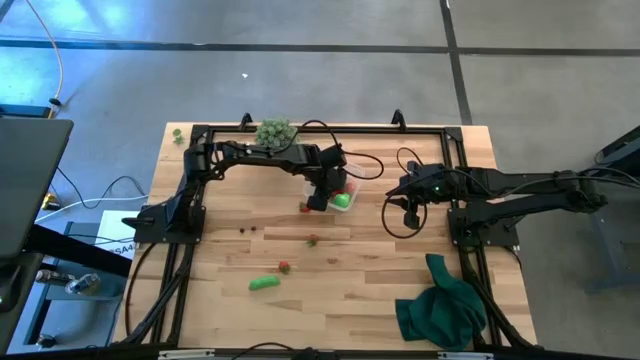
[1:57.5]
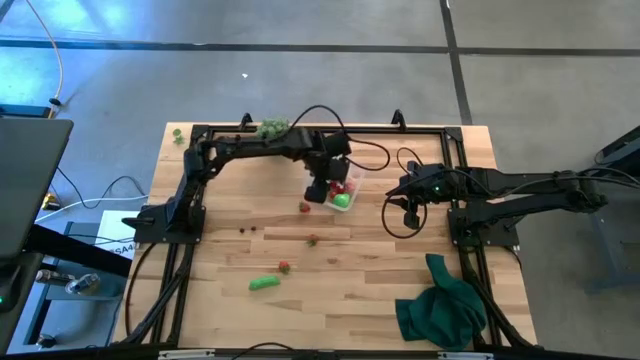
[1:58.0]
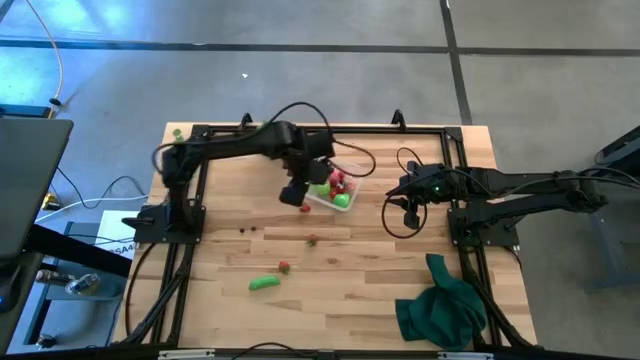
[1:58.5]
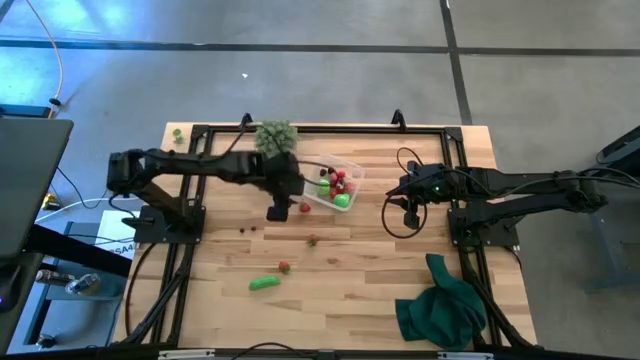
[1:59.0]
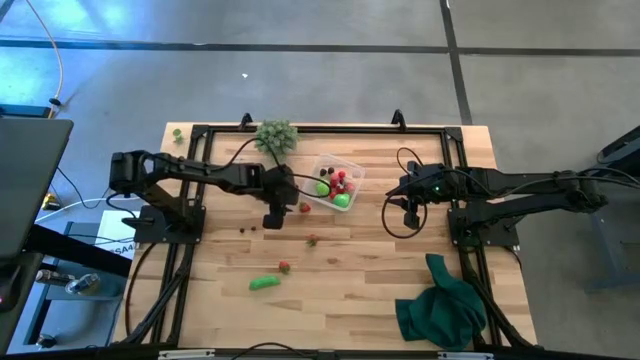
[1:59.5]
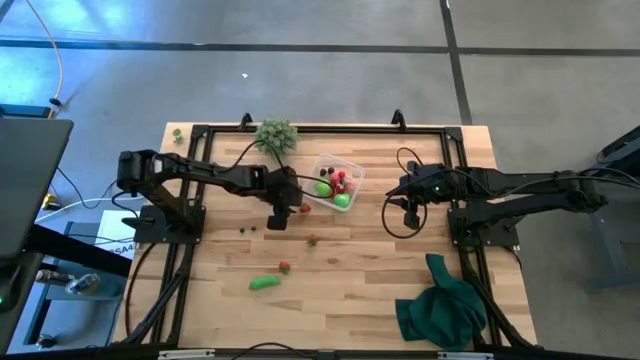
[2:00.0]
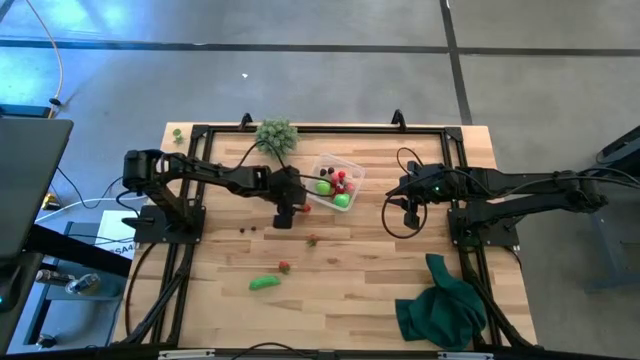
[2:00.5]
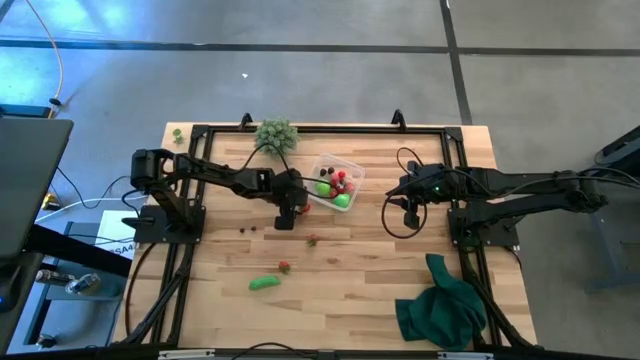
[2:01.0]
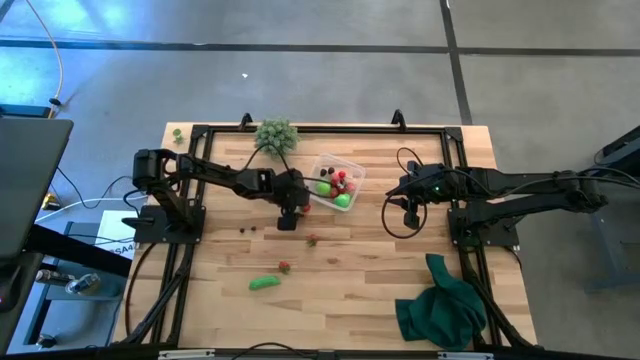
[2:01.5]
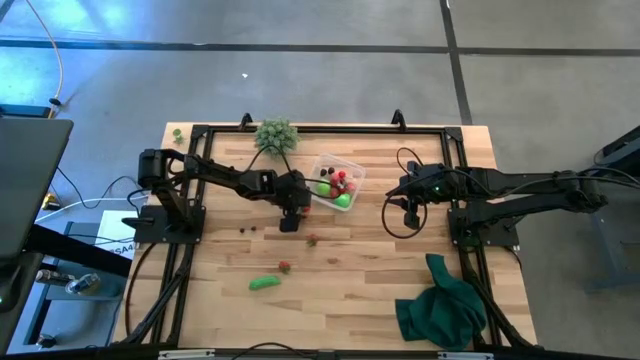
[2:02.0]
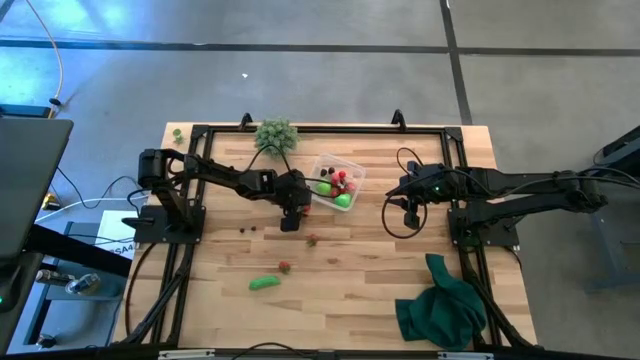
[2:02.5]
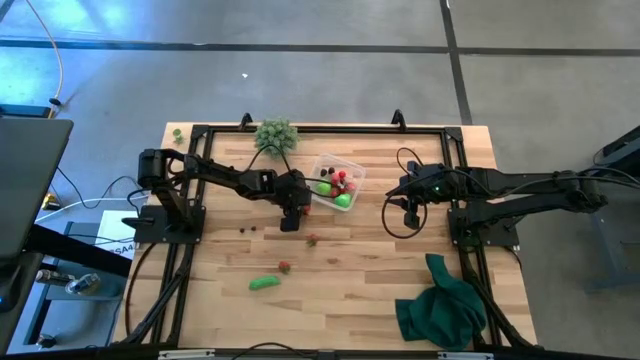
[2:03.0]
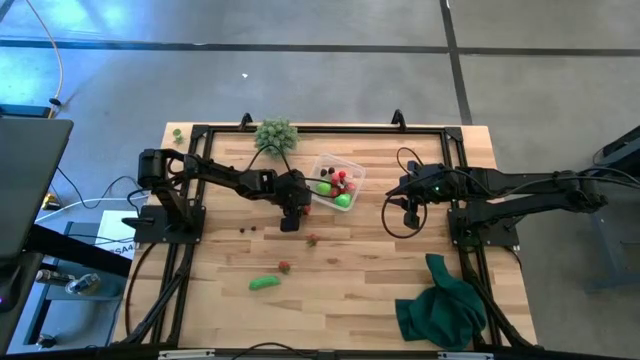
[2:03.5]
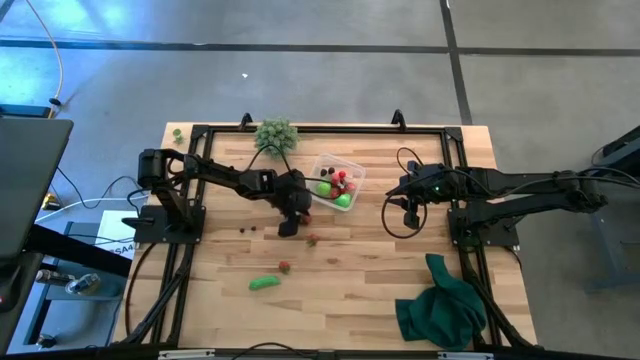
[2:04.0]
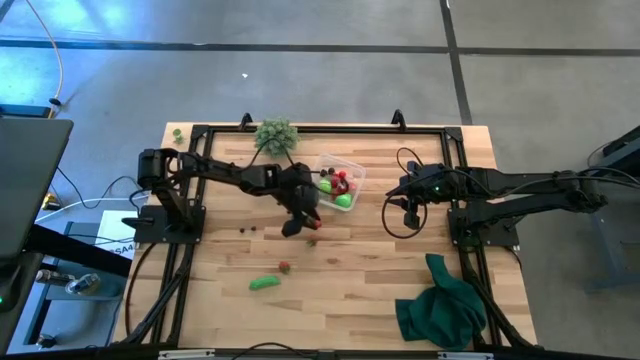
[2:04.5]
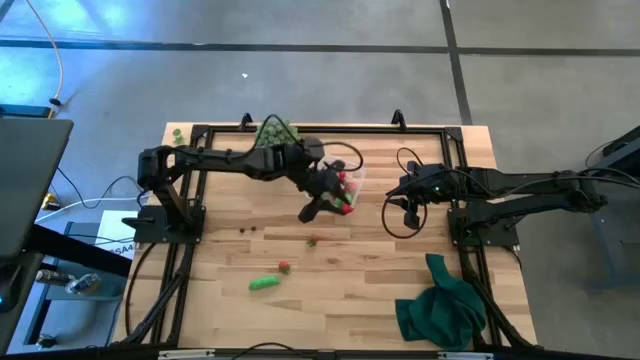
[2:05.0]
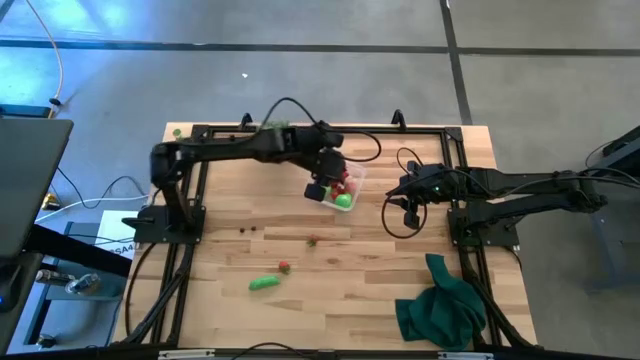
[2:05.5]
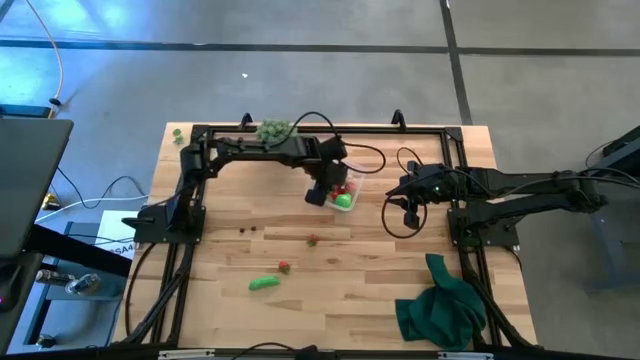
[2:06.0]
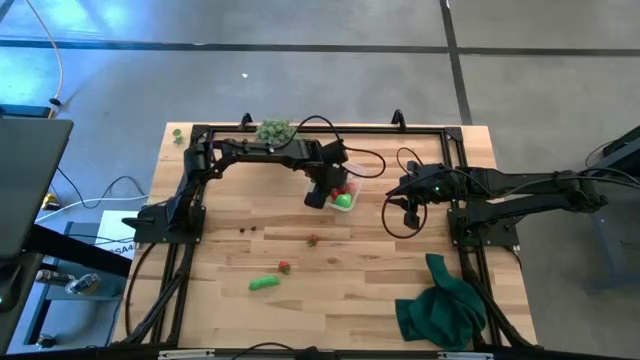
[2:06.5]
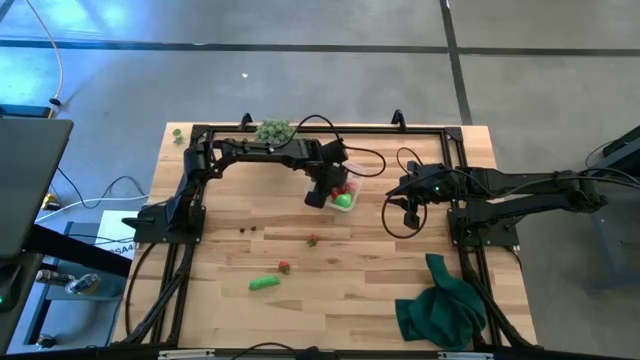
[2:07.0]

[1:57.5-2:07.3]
Task: Pick and placing Produce into tupperware
Put the strawberry into the transparent container

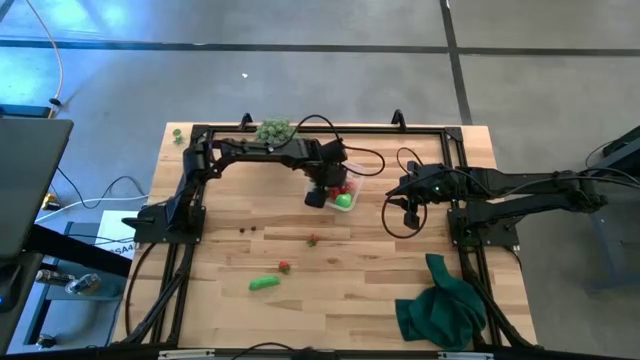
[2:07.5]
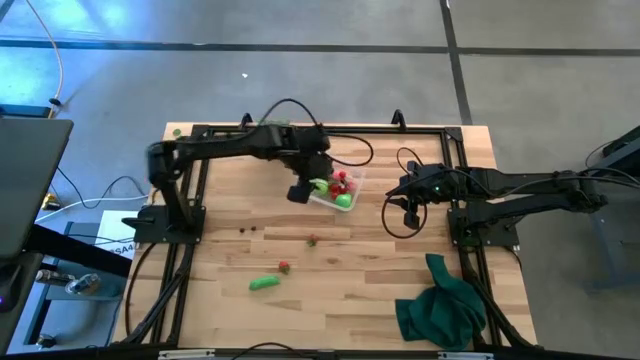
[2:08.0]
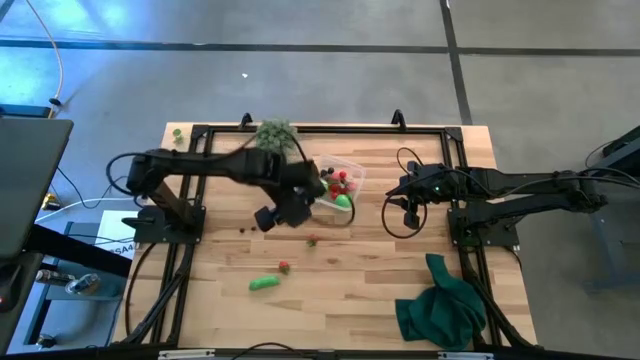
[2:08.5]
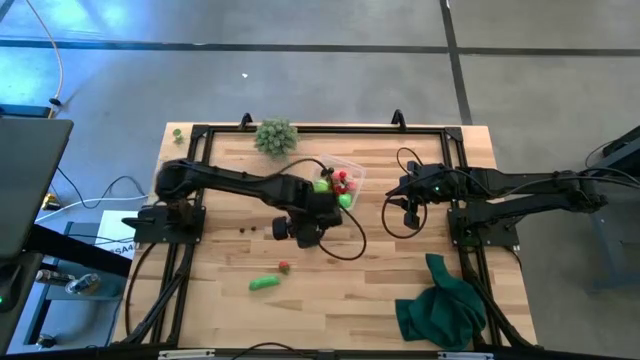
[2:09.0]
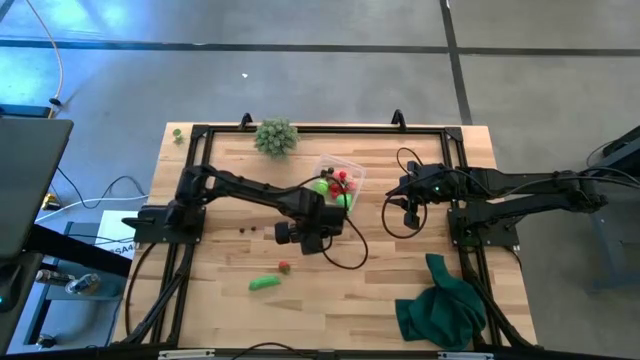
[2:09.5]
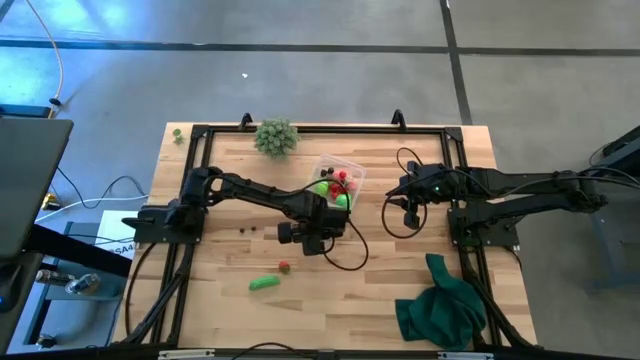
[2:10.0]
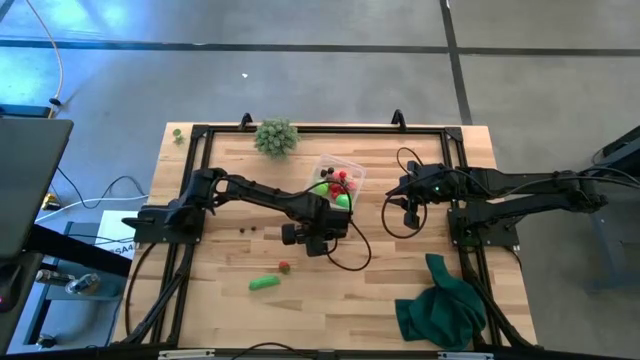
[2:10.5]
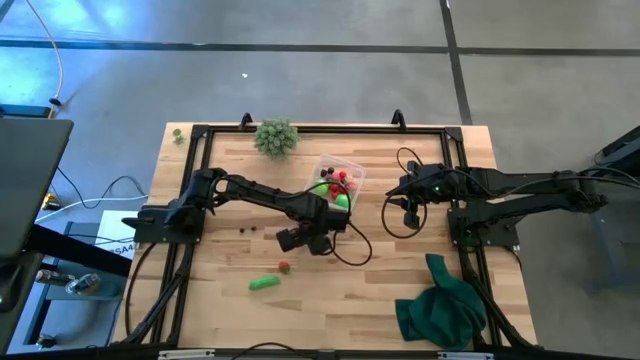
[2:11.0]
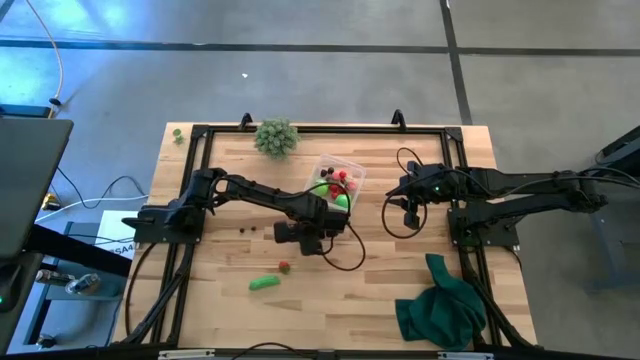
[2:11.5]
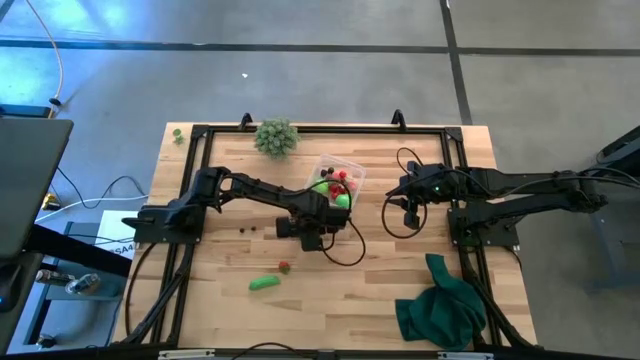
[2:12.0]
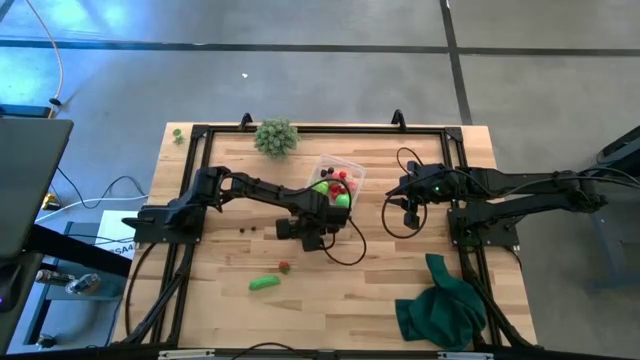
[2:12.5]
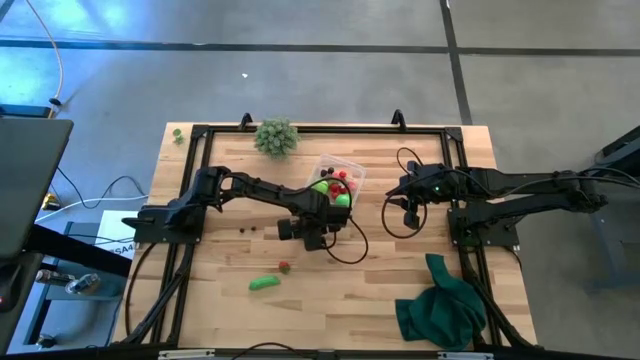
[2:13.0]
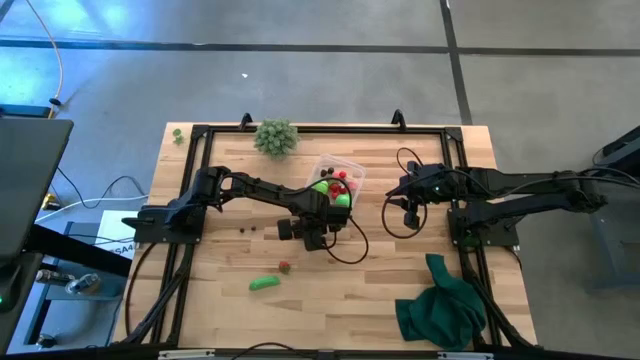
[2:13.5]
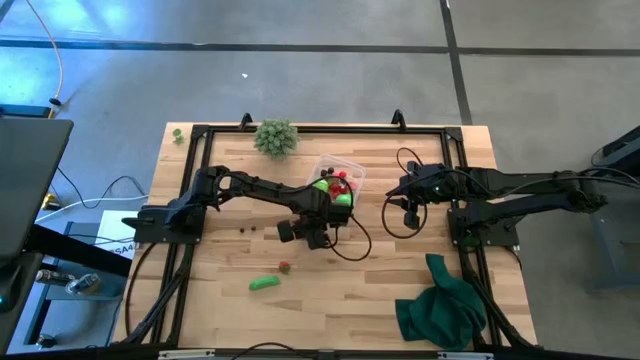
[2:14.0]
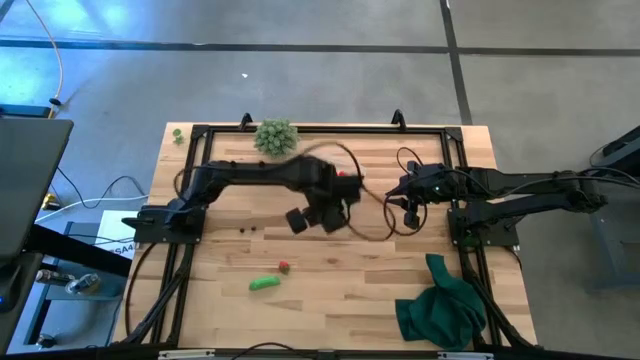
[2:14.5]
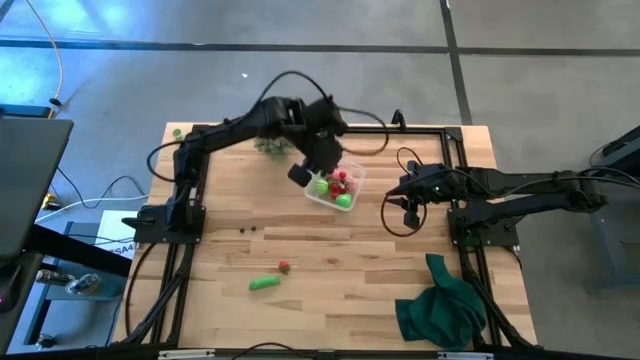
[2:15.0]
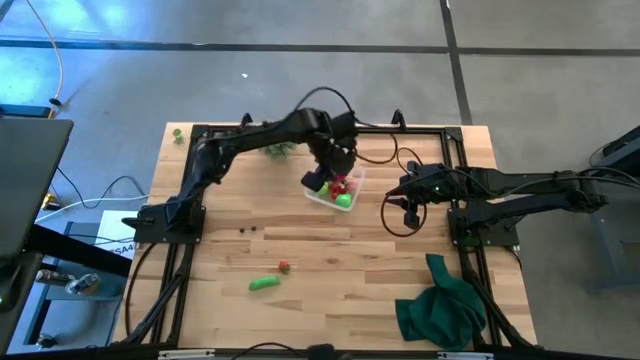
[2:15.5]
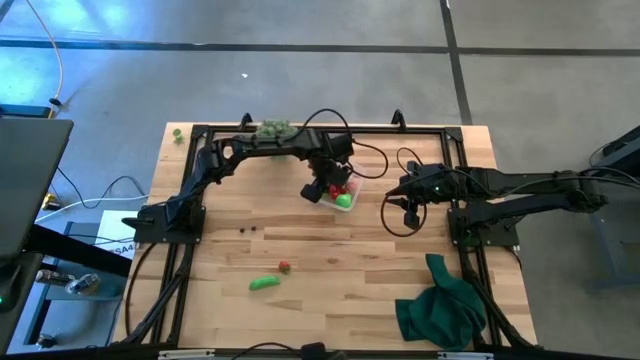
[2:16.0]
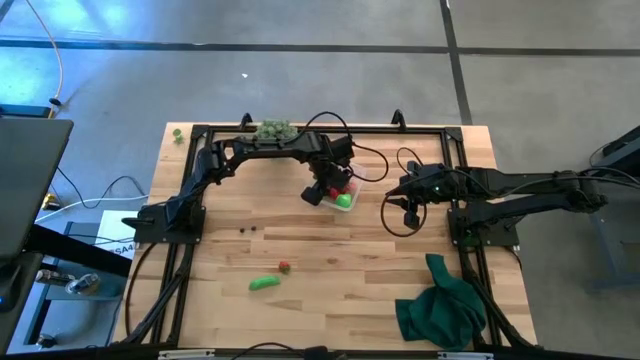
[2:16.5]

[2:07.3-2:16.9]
Put the strawberry into the transparent container

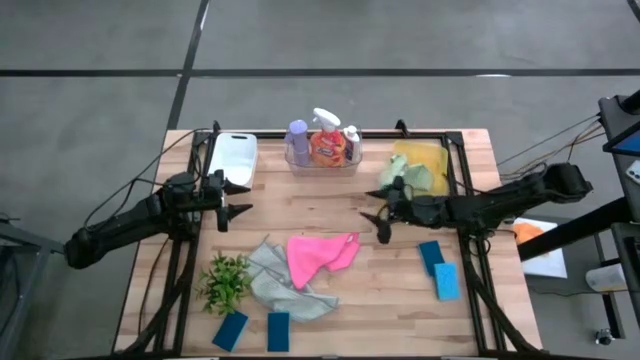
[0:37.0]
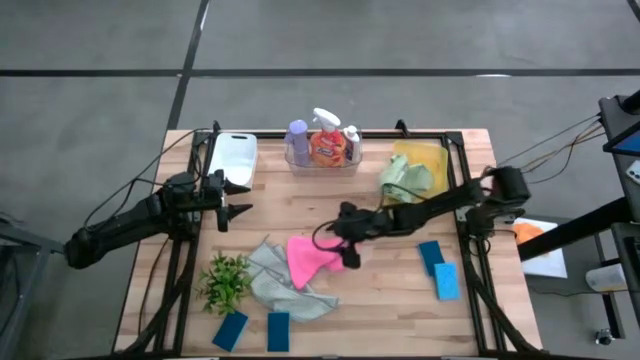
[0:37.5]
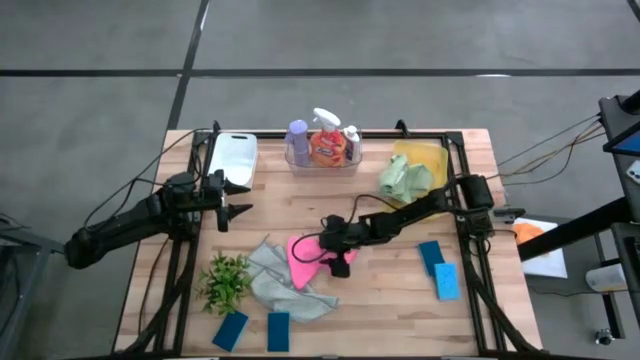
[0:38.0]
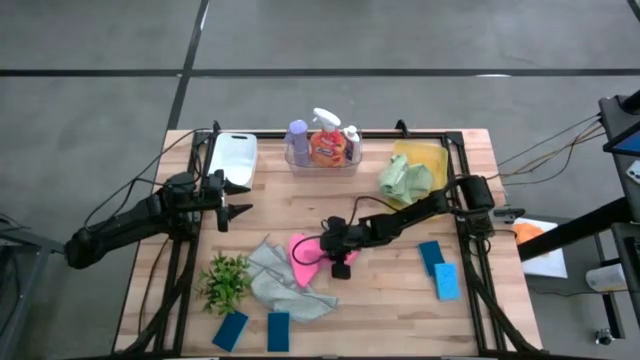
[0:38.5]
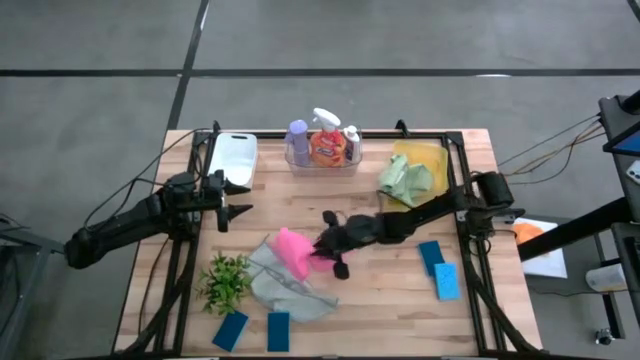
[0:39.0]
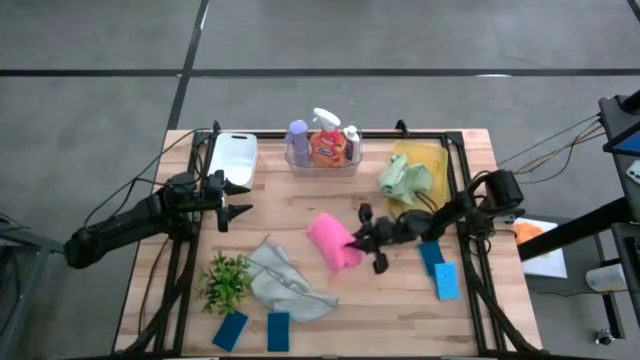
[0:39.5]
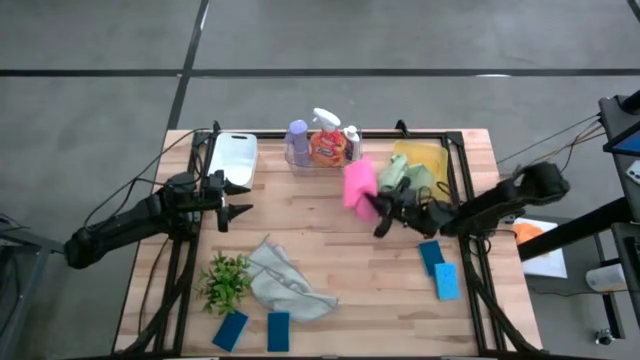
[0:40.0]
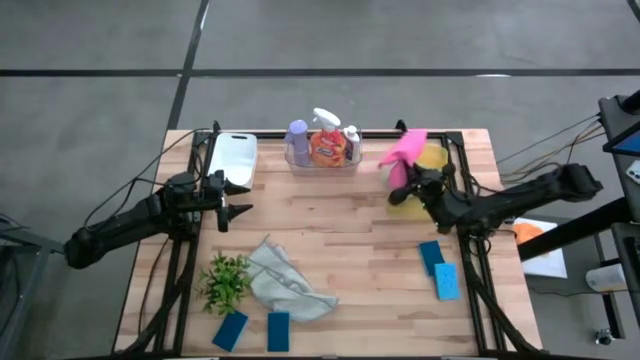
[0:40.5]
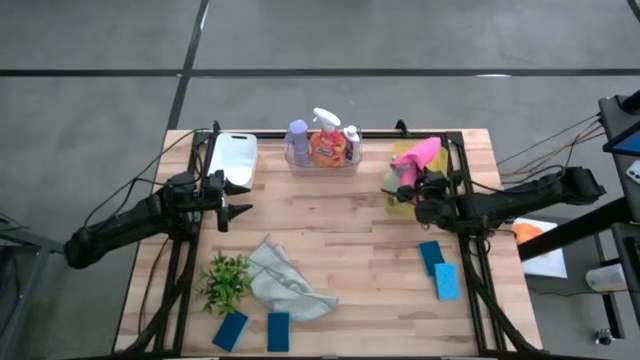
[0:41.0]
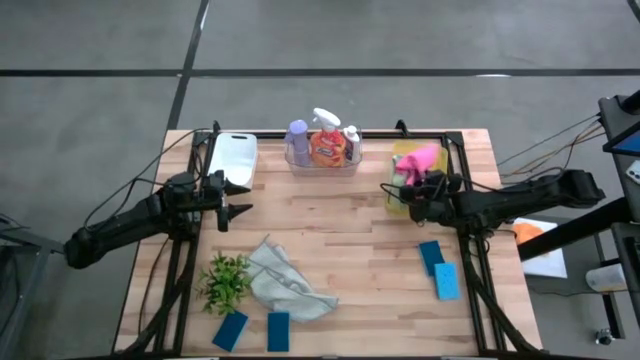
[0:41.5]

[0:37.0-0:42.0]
Task: Pick & Place Kitchen Items
Put the pink towel into the yellow bin
